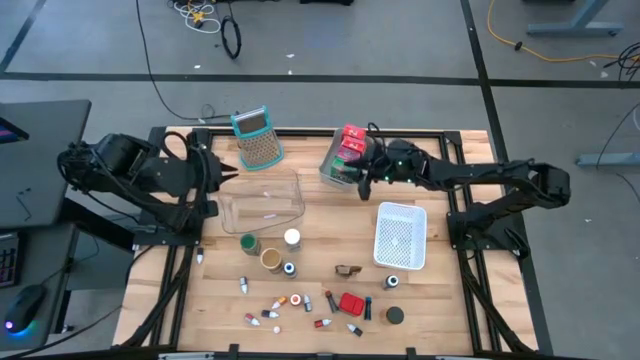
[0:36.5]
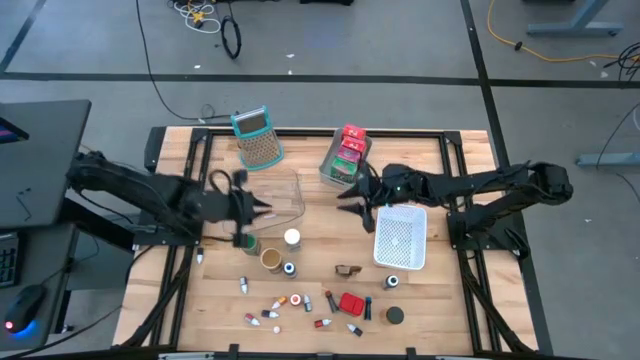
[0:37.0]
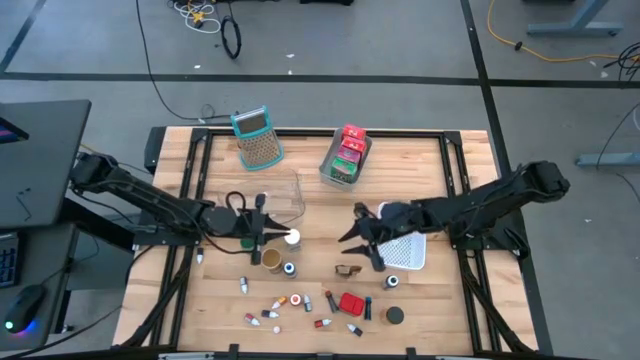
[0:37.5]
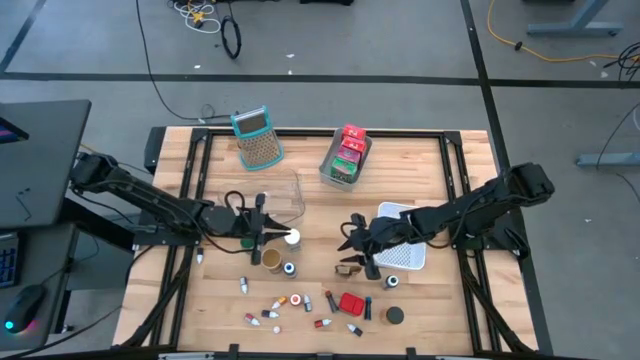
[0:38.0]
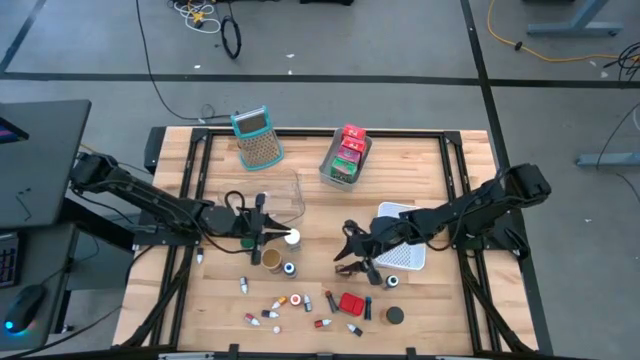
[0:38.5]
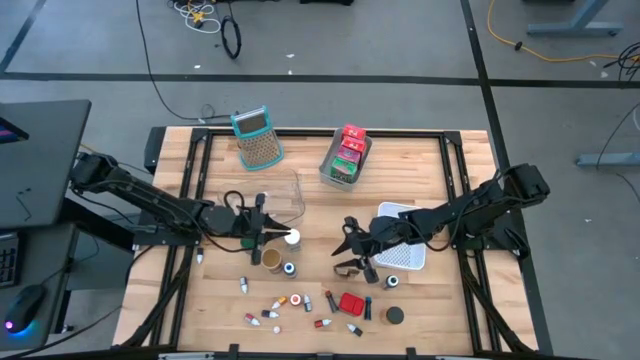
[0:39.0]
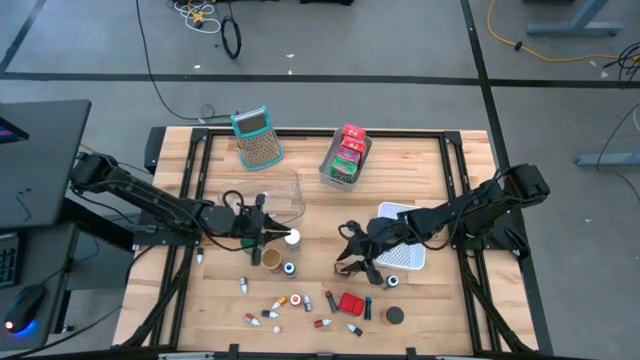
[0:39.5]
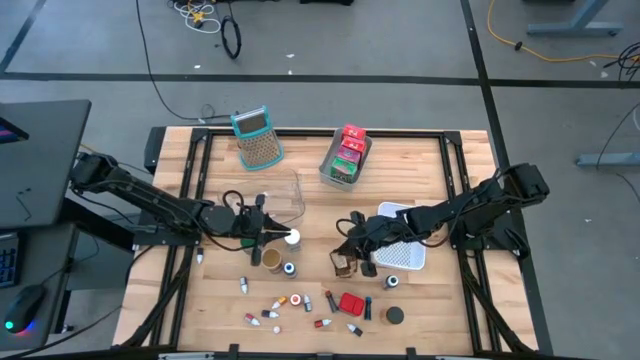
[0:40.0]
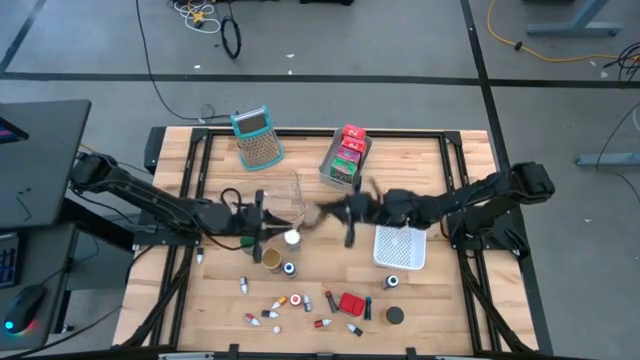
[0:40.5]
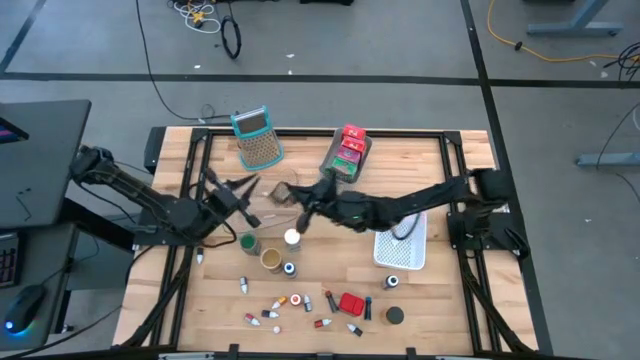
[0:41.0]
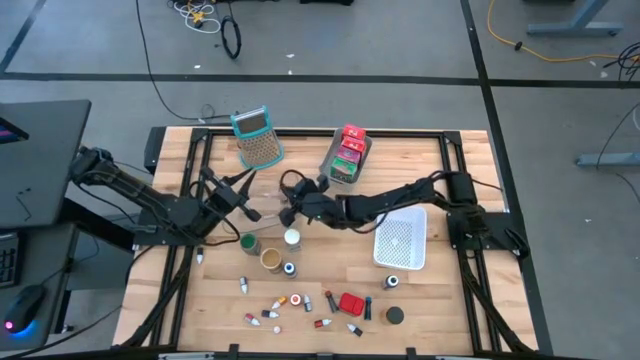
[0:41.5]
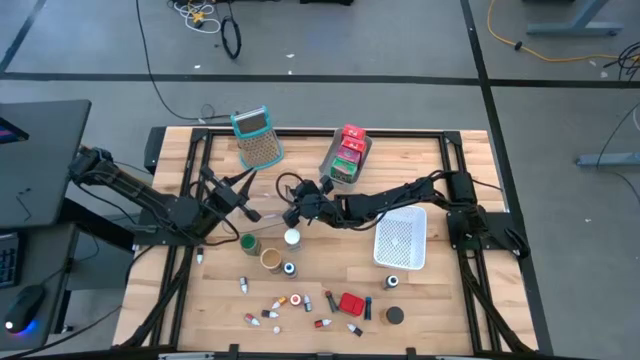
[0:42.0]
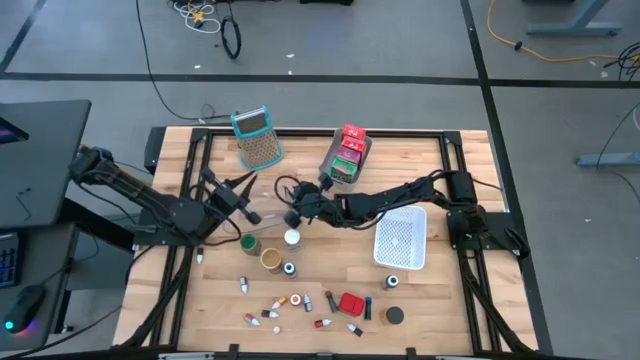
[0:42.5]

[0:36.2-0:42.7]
Task: Pick & Place Kitchen Items
Put the orange seasoning packet into the transparent bin

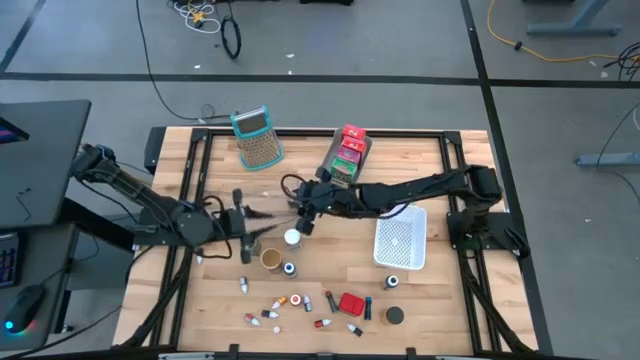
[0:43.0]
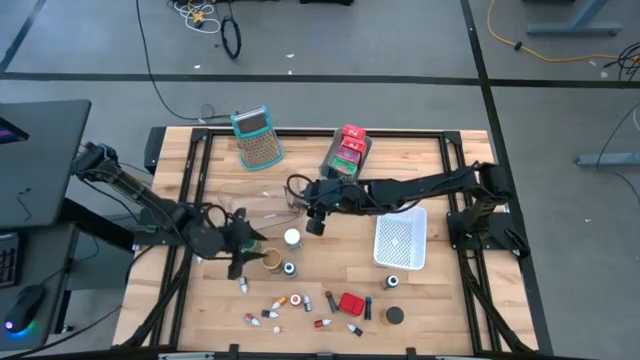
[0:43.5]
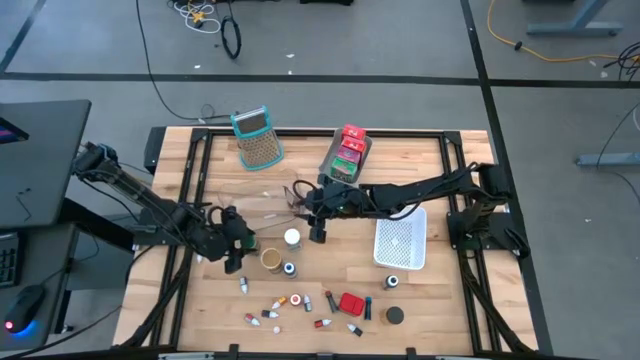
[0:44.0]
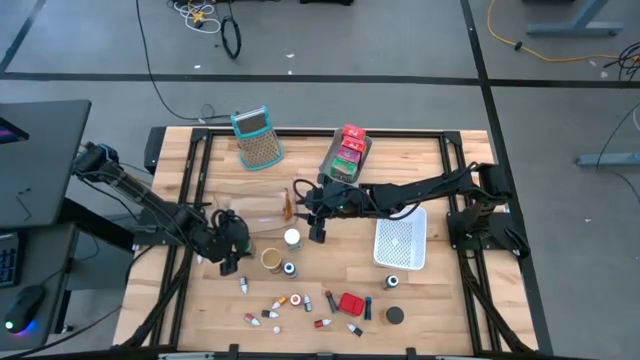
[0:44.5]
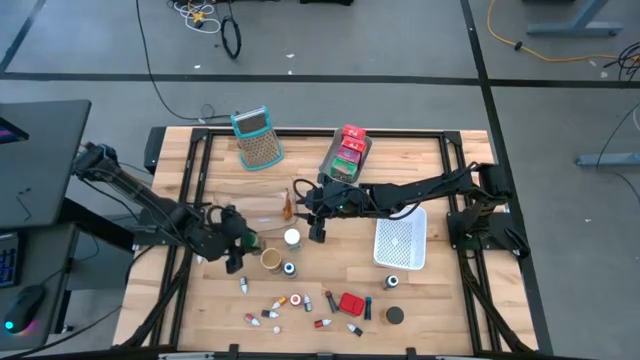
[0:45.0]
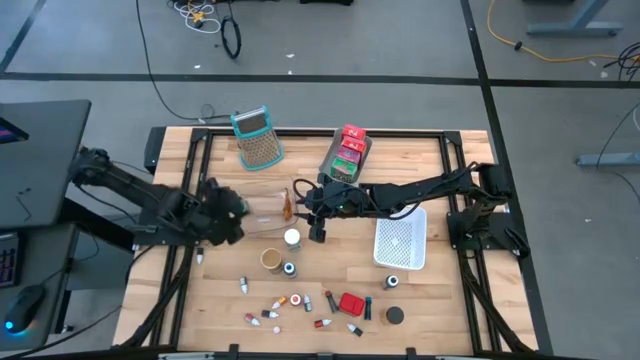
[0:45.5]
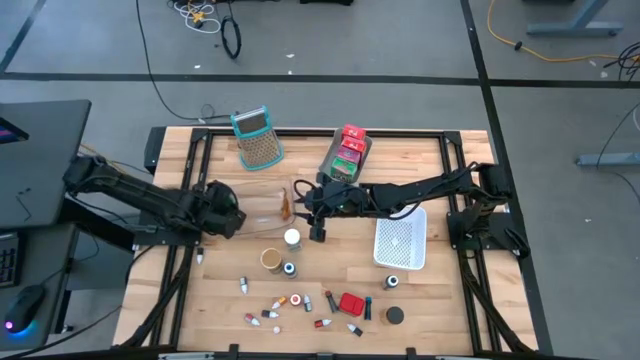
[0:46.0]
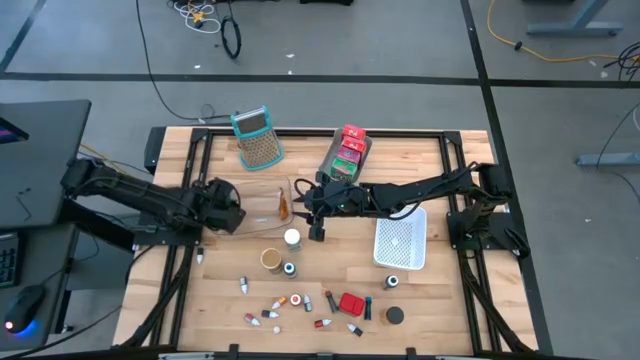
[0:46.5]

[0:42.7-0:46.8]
Put the green seasoning bottle into the transparent bin

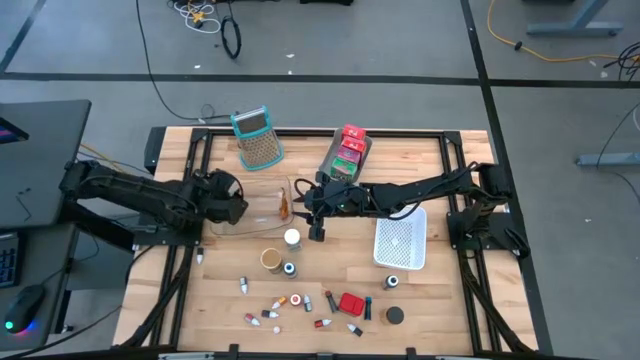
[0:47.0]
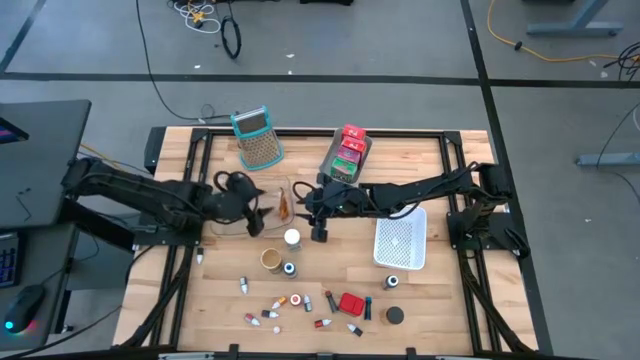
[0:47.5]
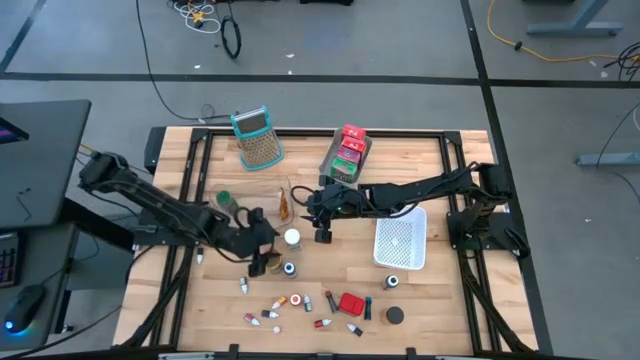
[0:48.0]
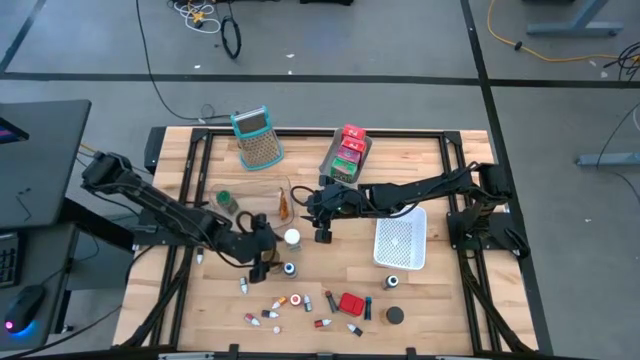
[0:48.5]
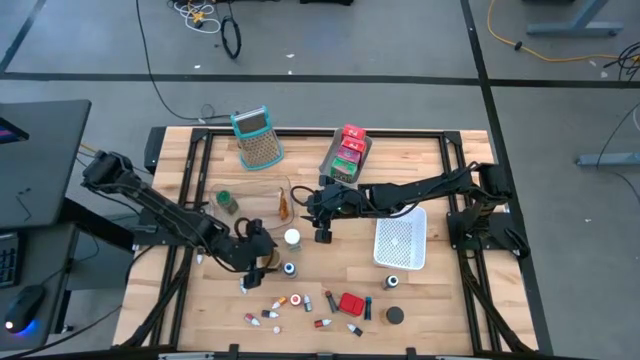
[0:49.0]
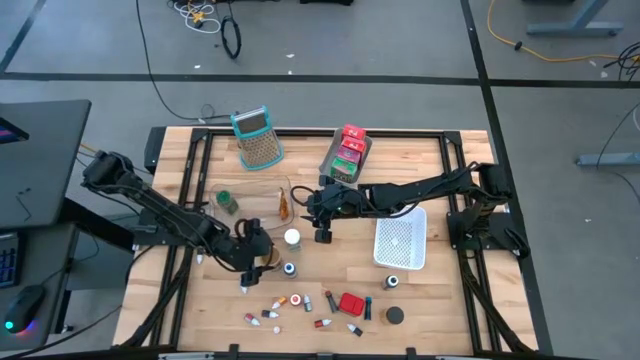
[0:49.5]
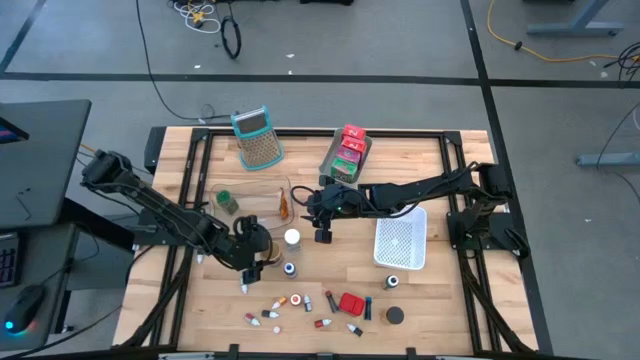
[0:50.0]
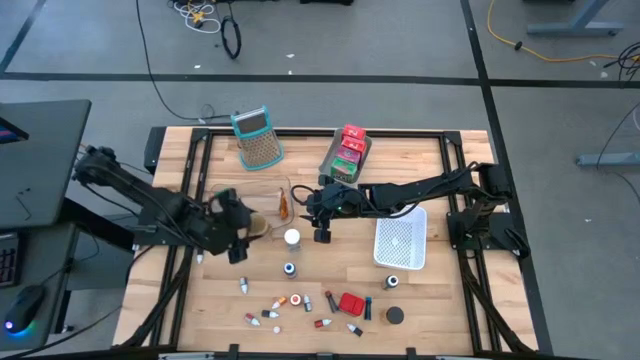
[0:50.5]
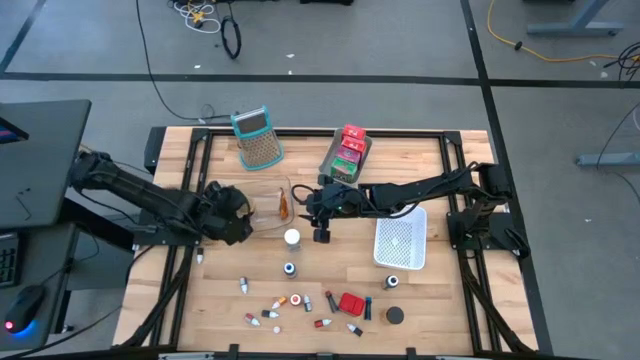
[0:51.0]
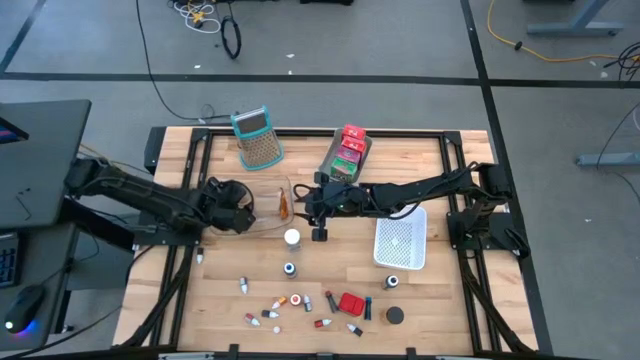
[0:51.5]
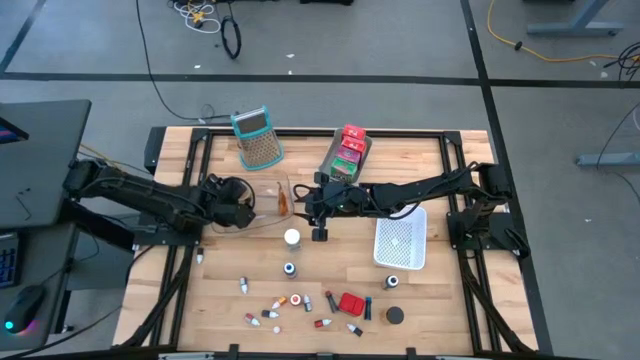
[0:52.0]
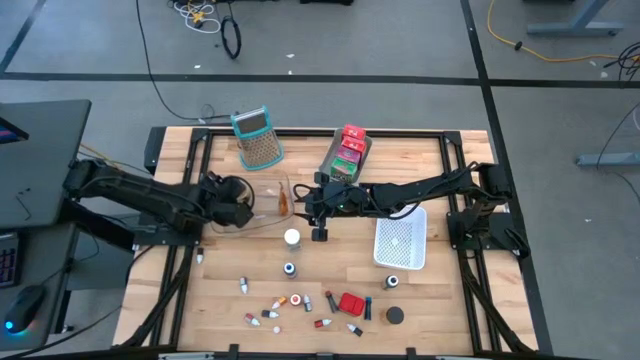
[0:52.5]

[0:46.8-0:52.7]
Put the brown seasoning bottle into the transparent bin

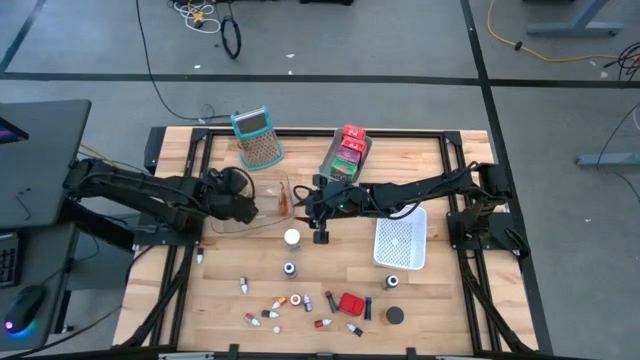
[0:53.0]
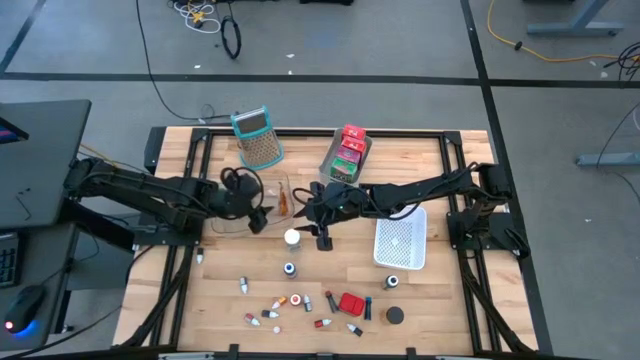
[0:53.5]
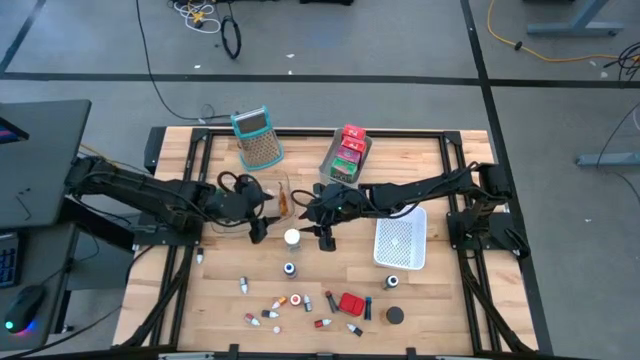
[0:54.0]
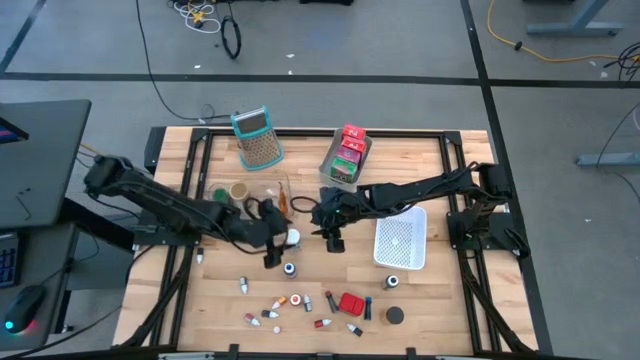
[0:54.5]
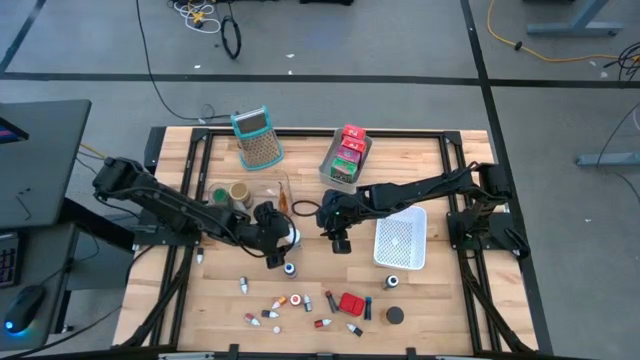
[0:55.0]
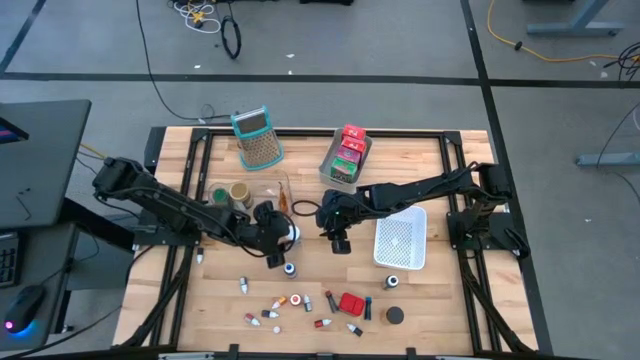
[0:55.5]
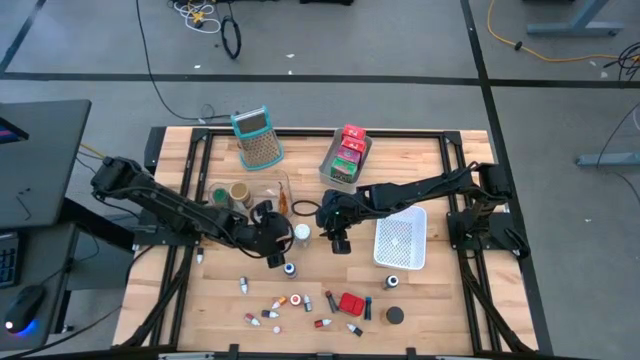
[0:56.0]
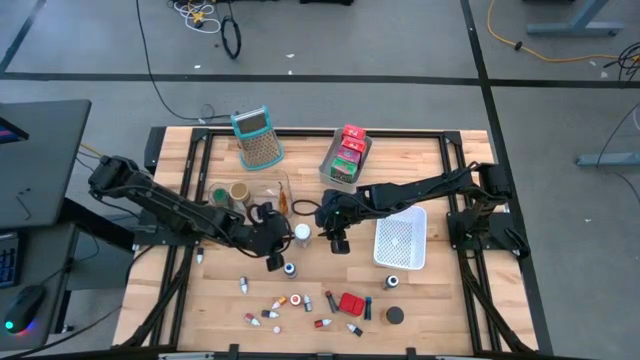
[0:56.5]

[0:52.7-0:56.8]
Put the white seasoning bottle into the transparent bin
